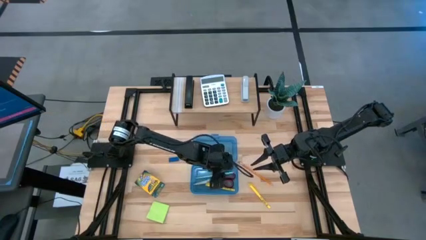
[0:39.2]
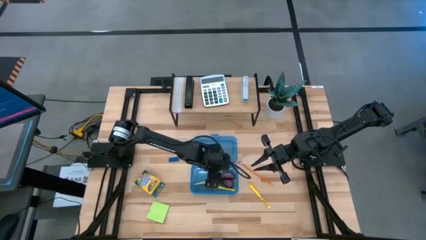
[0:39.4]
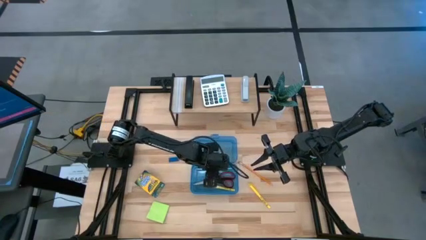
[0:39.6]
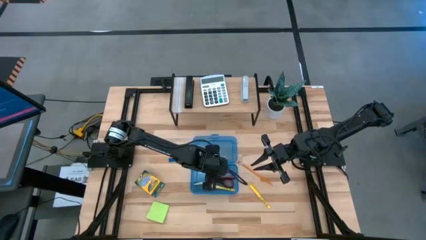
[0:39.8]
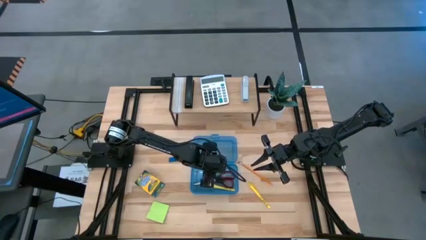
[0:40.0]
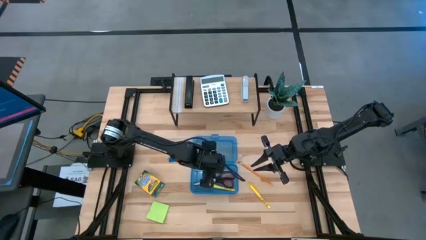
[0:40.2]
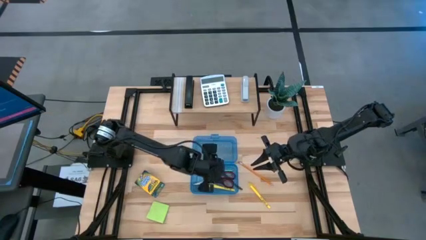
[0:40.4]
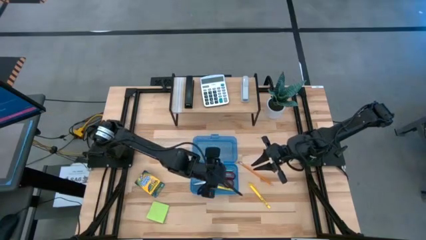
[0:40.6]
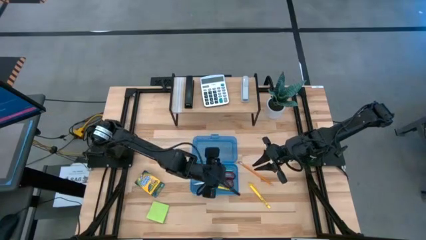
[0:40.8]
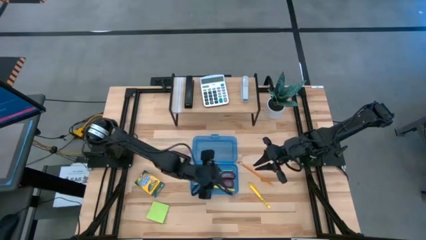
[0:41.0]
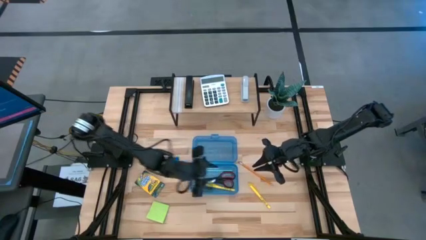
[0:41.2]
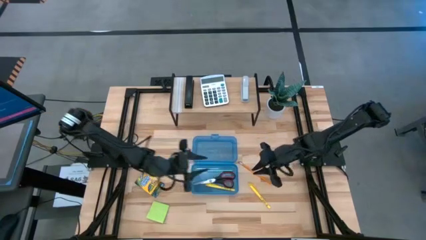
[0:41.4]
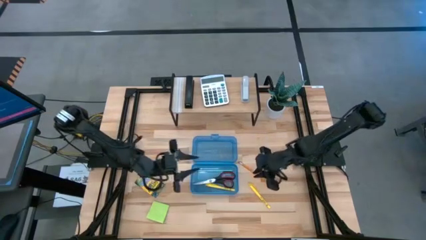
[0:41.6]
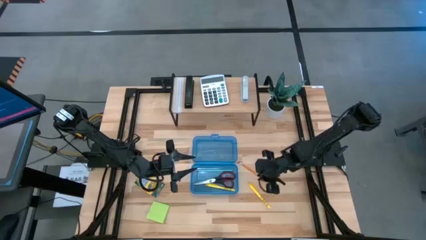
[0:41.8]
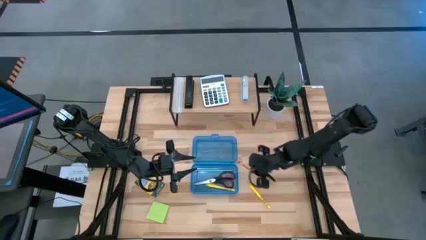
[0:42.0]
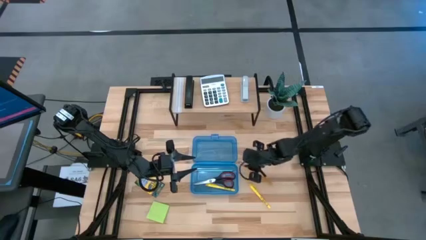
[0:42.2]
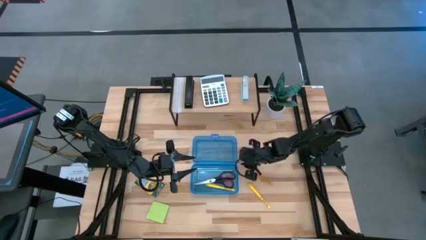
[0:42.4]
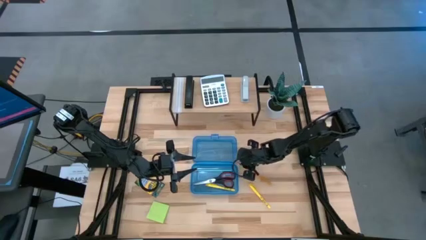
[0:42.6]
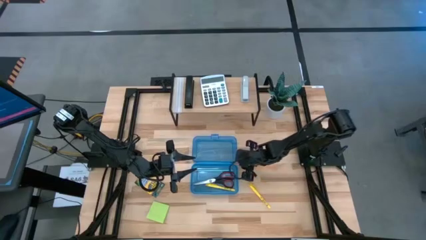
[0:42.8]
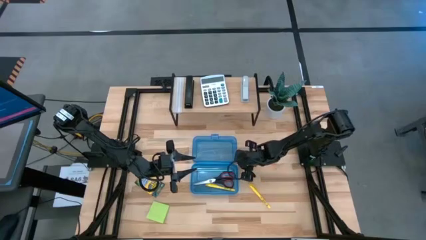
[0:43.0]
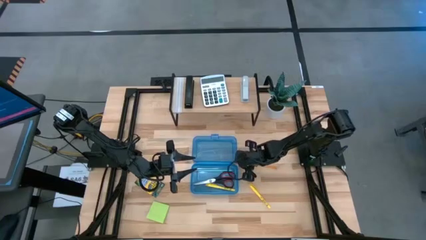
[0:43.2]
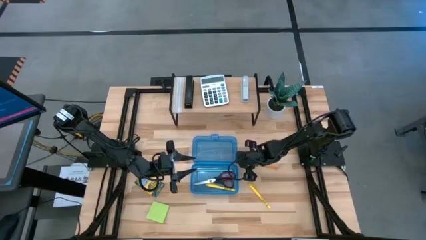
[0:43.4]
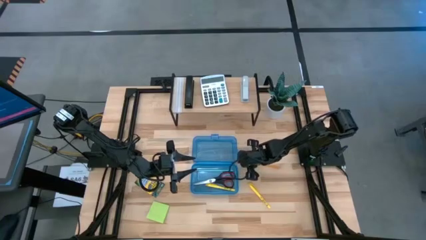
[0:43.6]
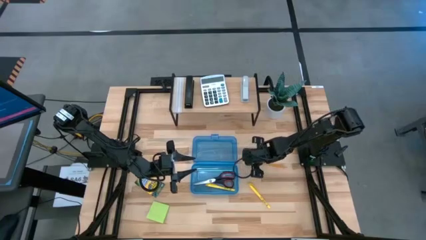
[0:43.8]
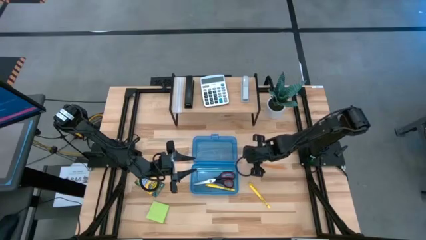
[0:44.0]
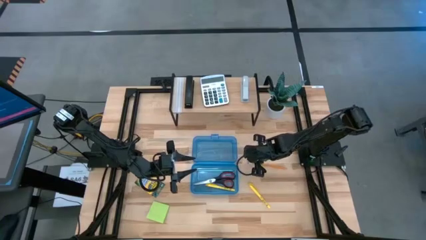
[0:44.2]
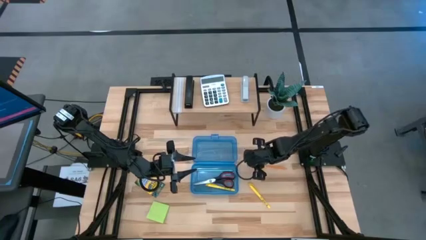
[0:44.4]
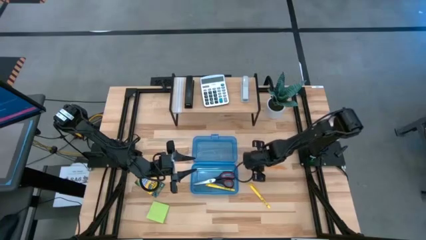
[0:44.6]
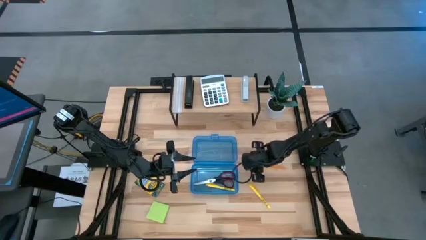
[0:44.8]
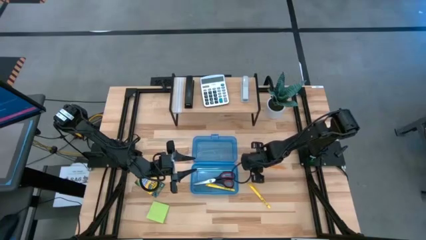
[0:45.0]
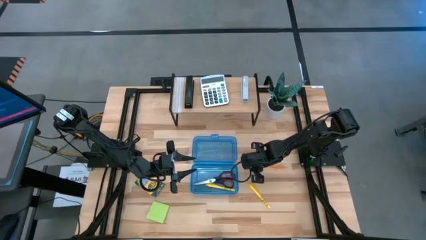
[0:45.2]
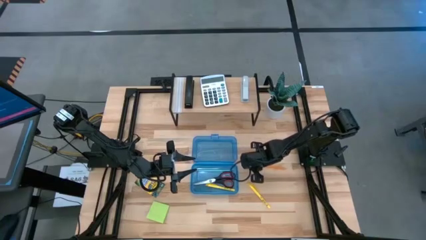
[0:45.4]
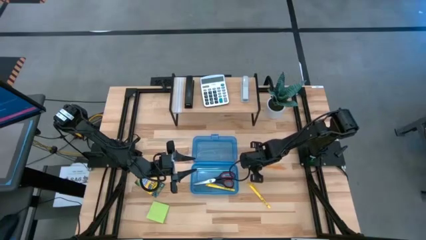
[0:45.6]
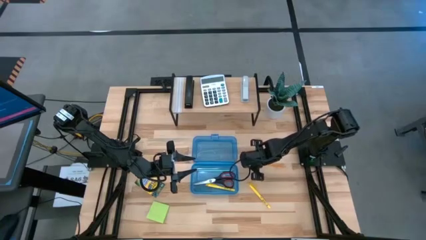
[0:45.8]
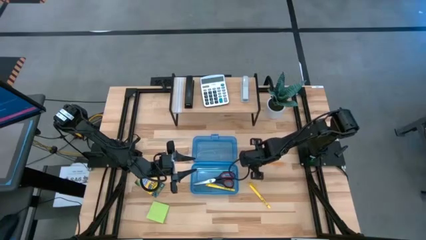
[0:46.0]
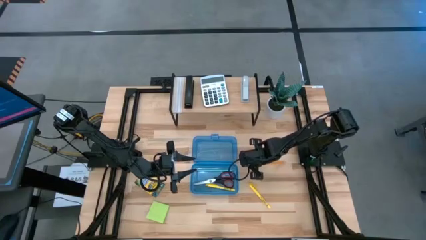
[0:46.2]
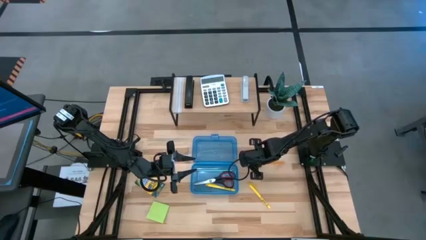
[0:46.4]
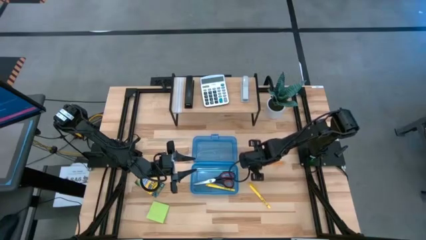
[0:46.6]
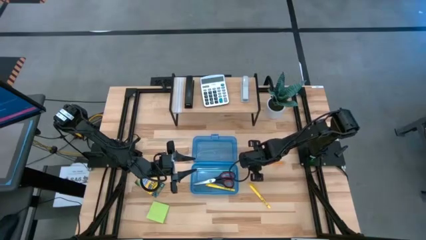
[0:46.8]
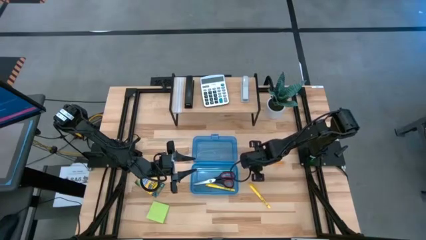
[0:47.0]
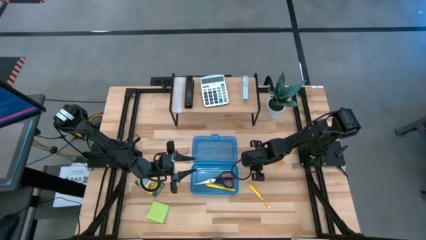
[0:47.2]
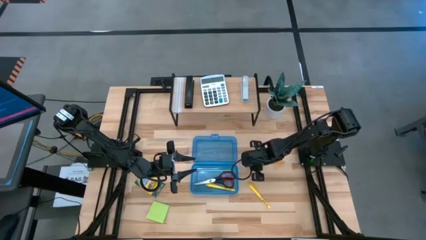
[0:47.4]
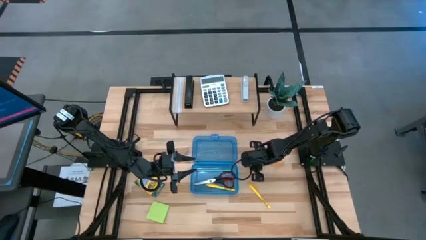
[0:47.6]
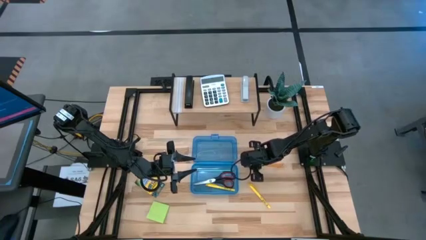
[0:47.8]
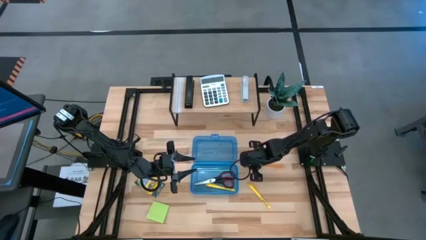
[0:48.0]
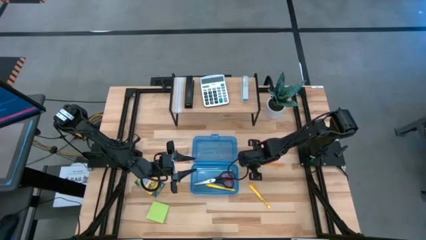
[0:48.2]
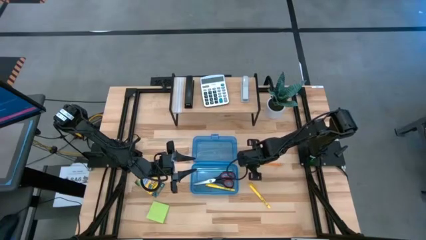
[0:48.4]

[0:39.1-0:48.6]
Task: Pack school essentials
Put the orange pencil into the blue supply box

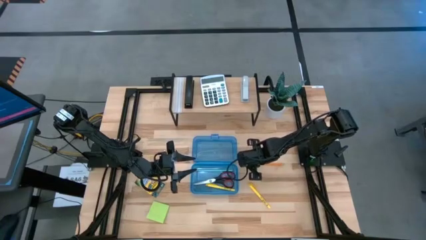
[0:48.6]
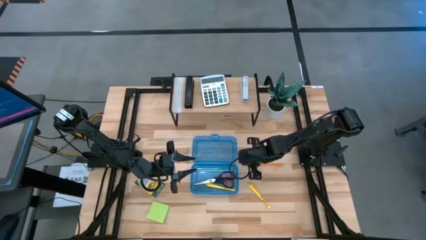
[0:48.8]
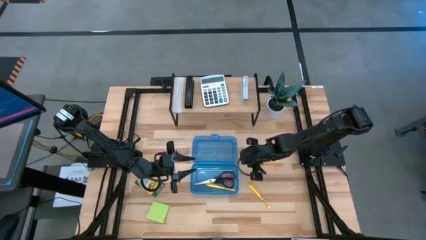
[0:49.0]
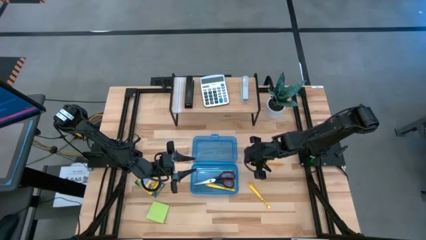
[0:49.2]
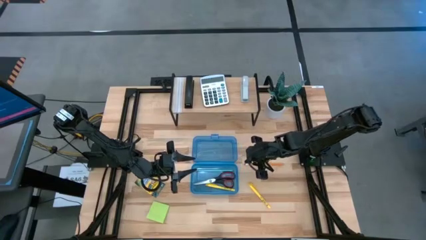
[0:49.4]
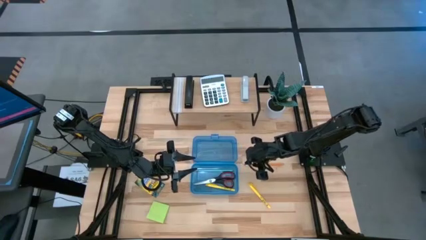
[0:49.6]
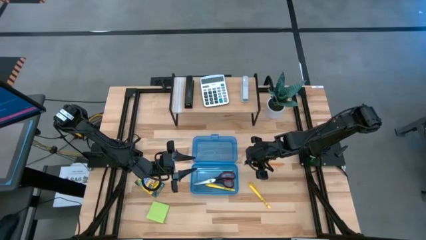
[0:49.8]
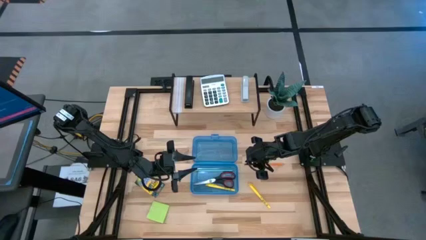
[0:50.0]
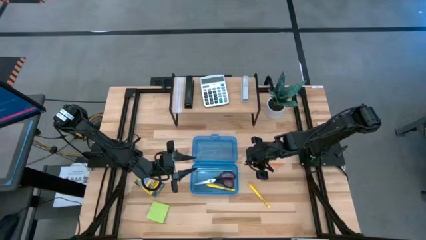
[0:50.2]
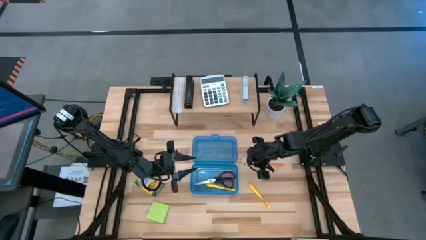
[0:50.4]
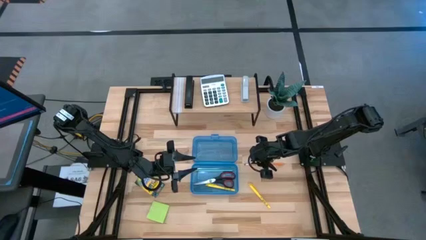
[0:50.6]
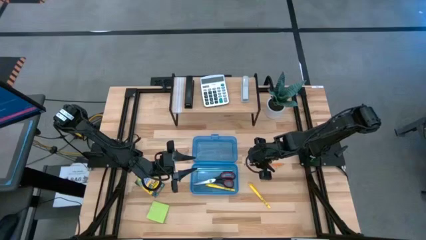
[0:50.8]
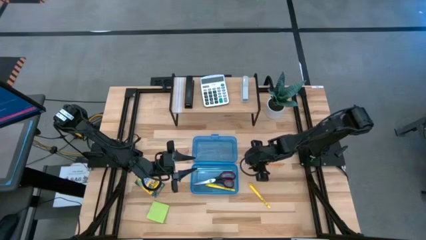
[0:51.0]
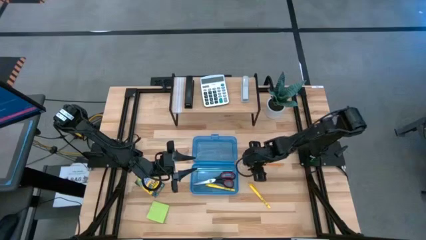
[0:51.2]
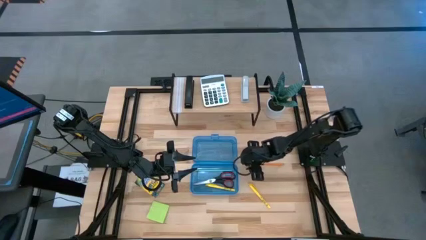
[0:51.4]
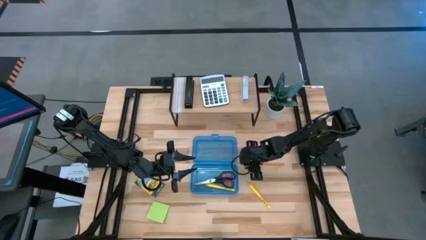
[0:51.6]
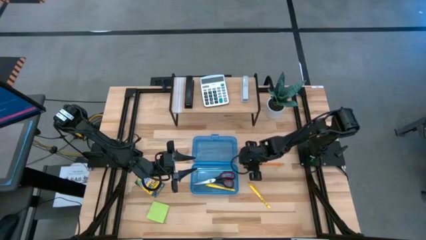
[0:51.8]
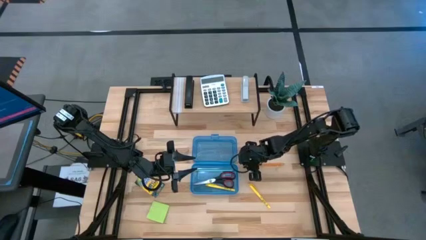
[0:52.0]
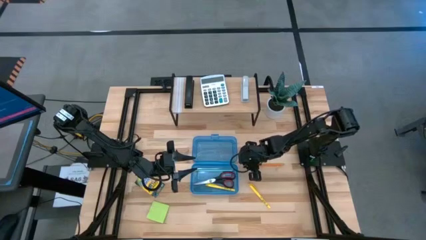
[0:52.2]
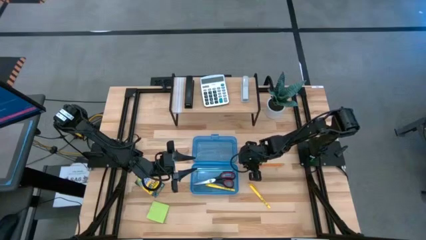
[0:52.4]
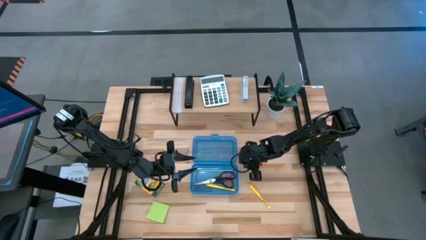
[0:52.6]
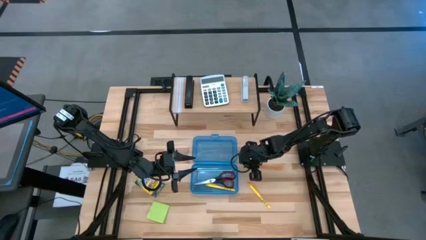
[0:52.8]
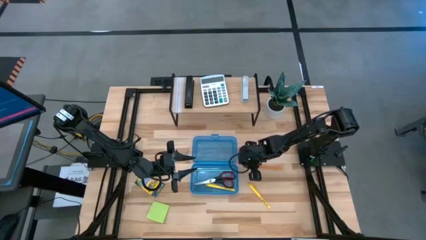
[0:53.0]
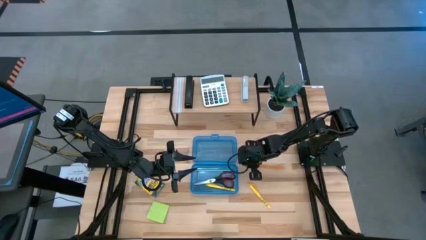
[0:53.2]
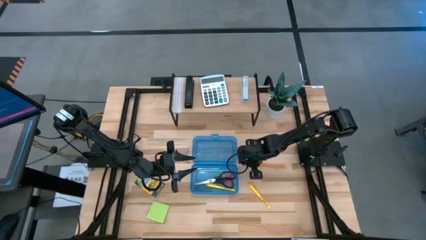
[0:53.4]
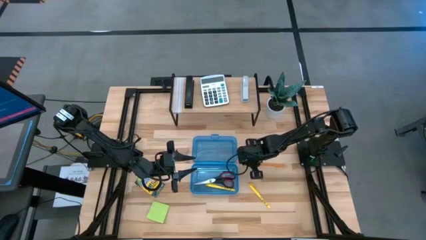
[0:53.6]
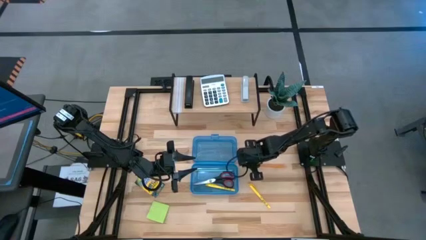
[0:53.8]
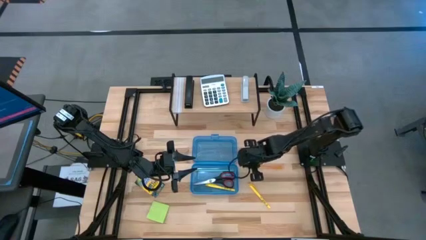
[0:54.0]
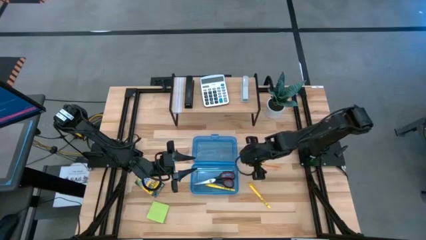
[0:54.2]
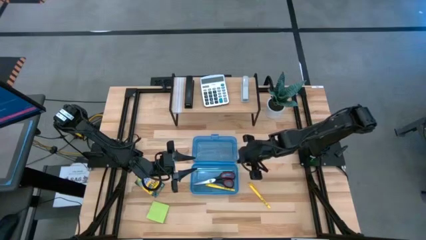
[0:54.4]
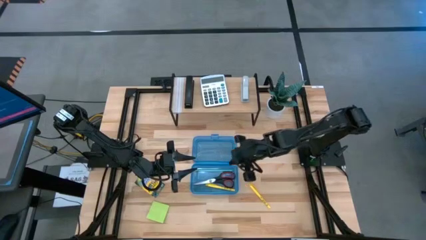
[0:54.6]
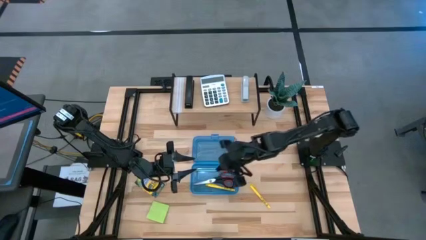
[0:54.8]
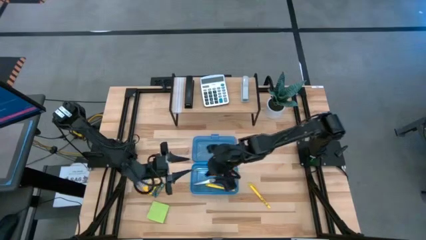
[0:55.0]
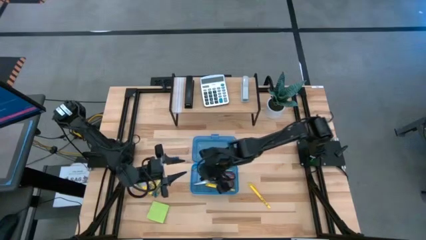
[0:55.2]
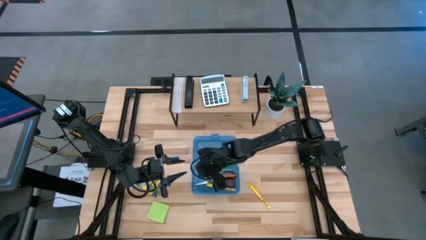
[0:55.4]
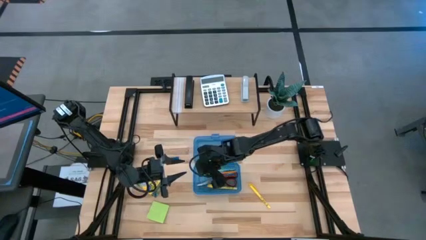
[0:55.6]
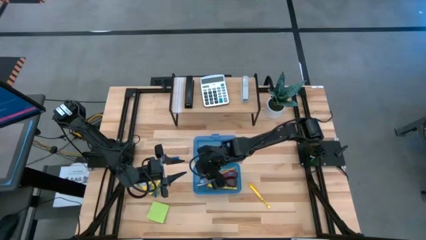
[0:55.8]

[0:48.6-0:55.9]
Put the orange pencil into the blue supply box
